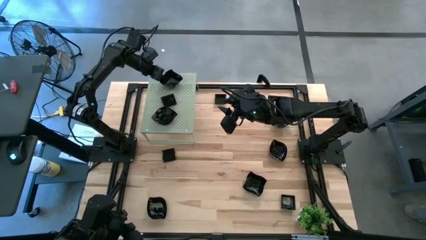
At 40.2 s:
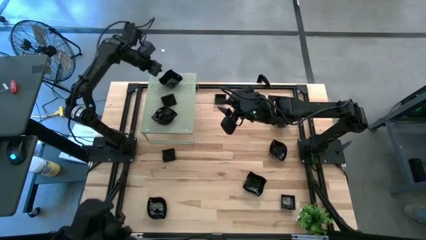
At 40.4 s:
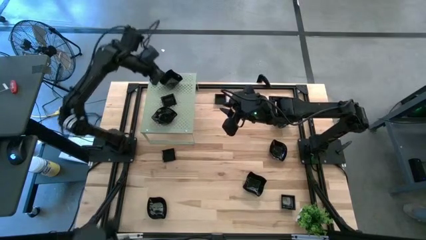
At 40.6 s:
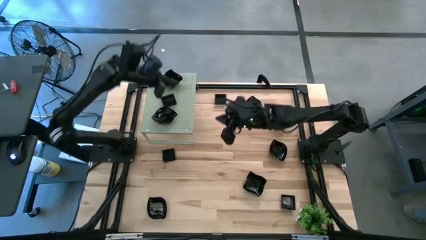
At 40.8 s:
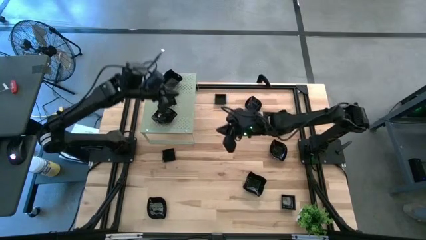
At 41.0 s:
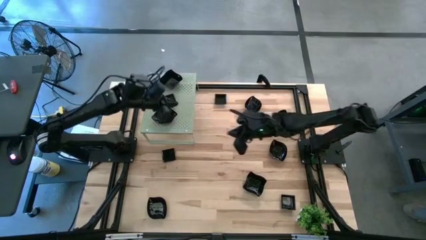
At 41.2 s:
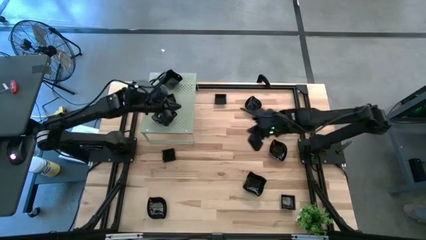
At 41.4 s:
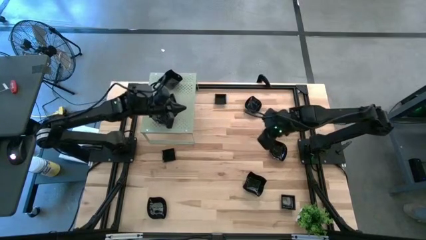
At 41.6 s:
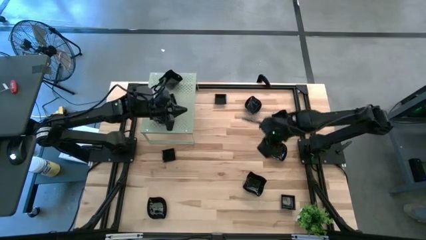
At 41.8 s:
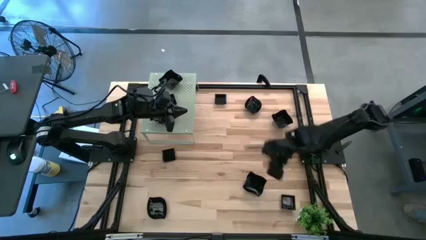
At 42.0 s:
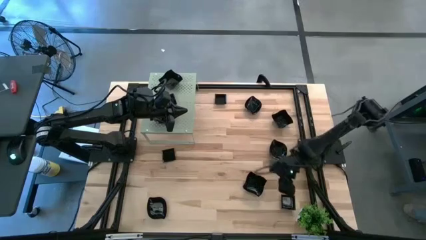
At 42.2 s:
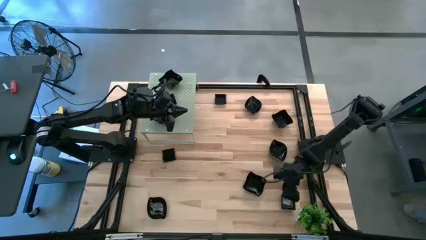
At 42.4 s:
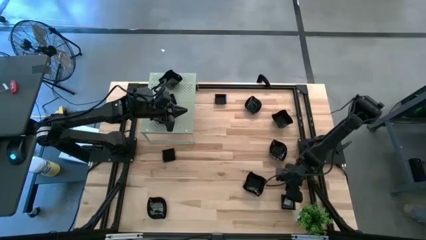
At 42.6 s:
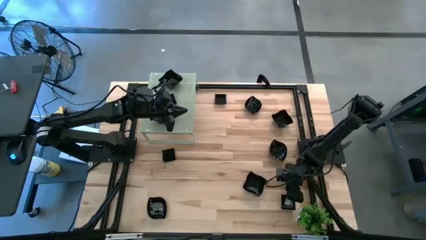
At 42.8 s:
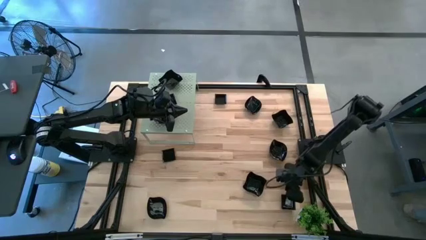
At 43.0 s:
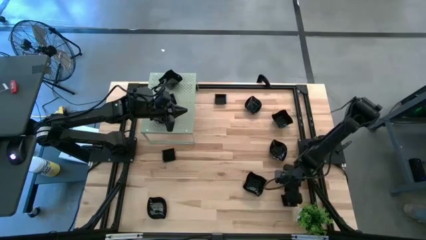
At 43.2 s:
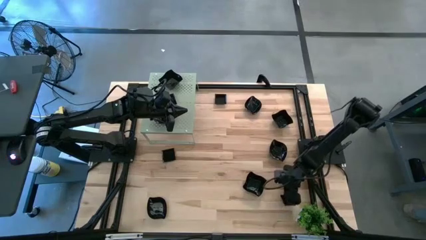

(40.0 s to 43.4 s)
Task: Pick & Place Mini shaped plates
Stack the square plate on the other square plate on the shelf

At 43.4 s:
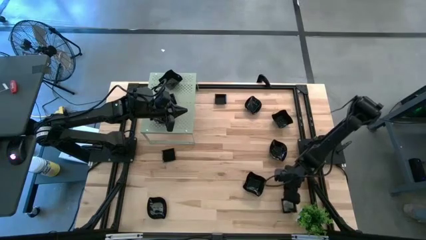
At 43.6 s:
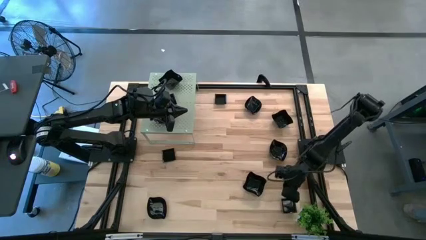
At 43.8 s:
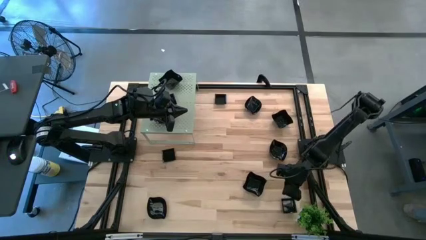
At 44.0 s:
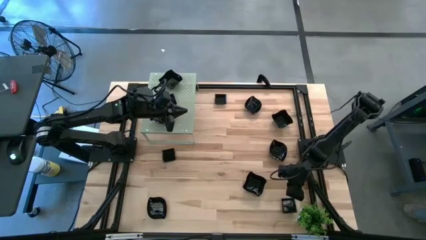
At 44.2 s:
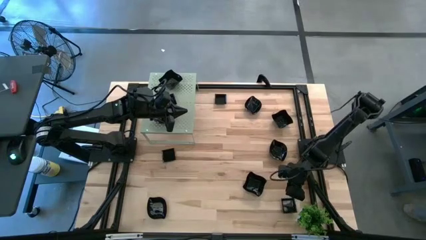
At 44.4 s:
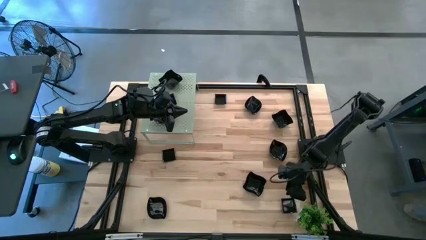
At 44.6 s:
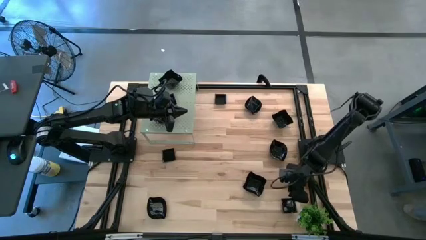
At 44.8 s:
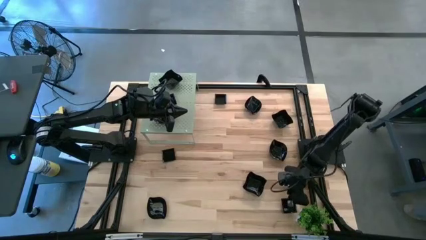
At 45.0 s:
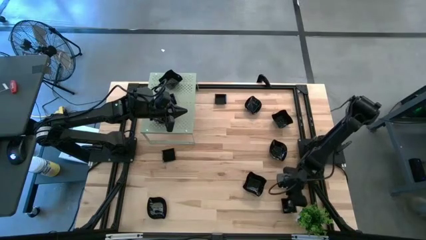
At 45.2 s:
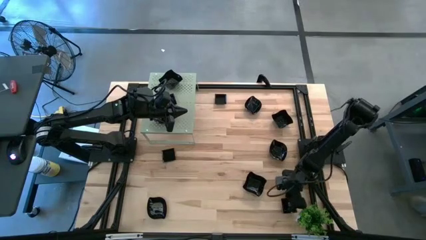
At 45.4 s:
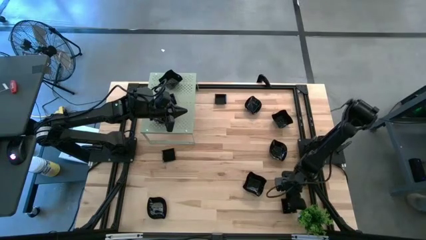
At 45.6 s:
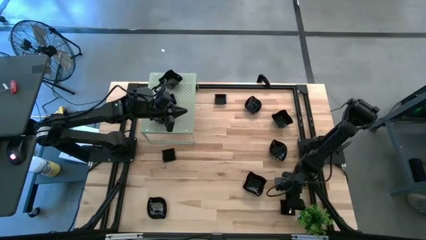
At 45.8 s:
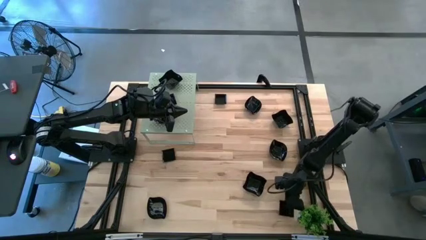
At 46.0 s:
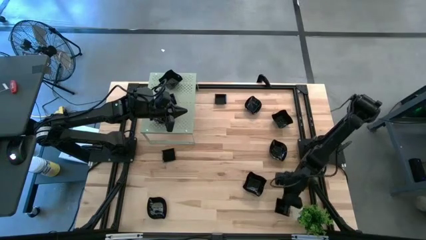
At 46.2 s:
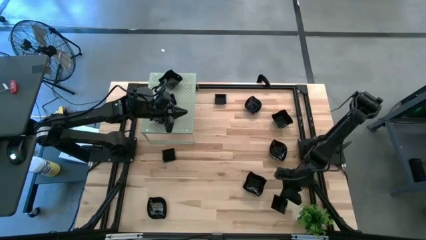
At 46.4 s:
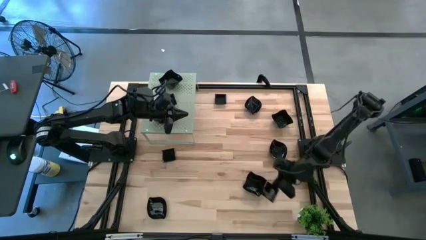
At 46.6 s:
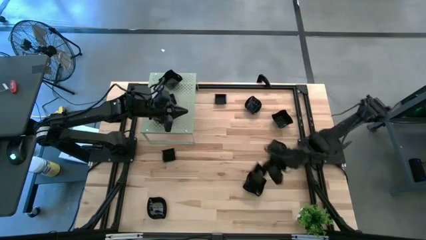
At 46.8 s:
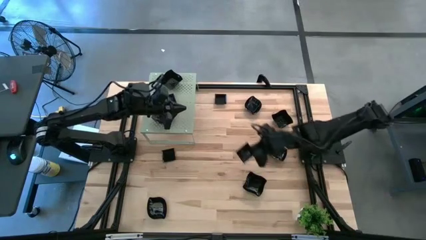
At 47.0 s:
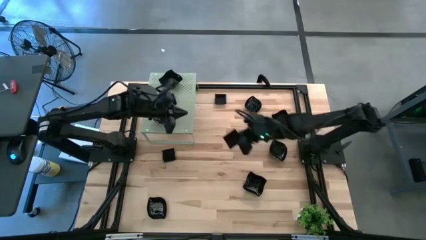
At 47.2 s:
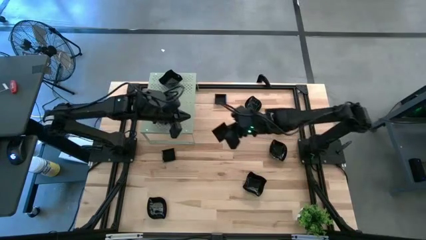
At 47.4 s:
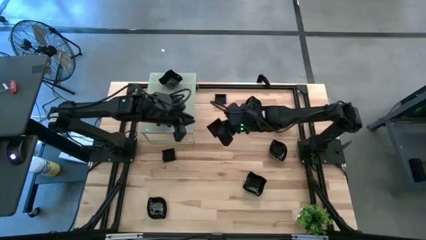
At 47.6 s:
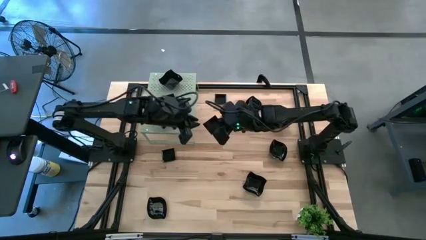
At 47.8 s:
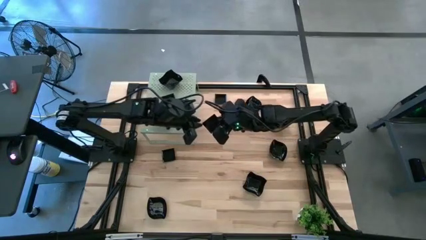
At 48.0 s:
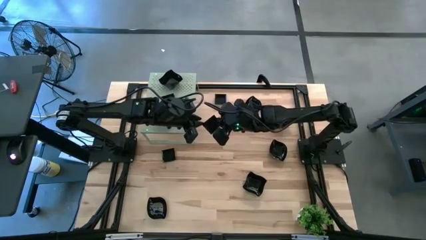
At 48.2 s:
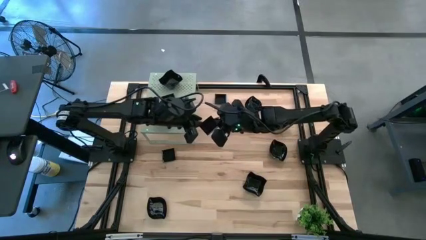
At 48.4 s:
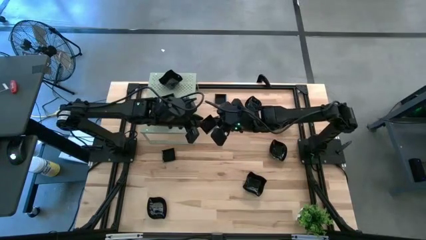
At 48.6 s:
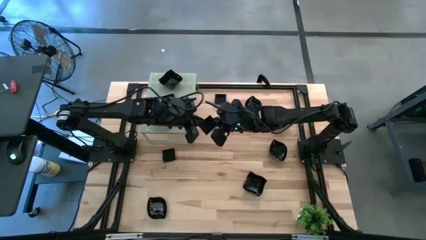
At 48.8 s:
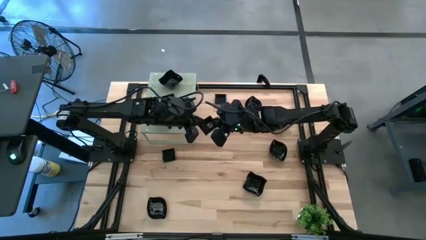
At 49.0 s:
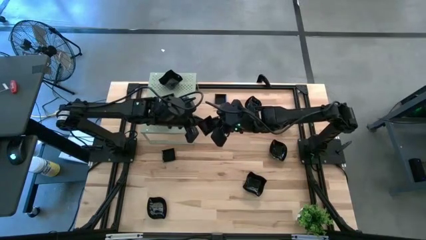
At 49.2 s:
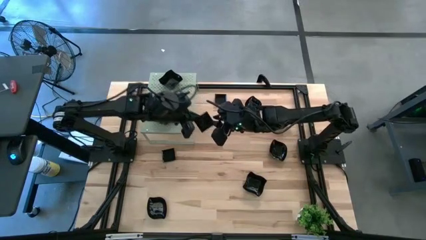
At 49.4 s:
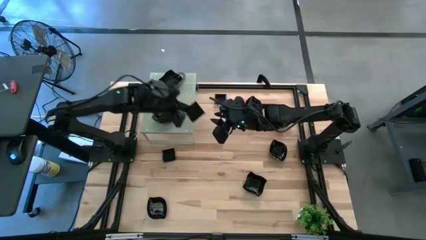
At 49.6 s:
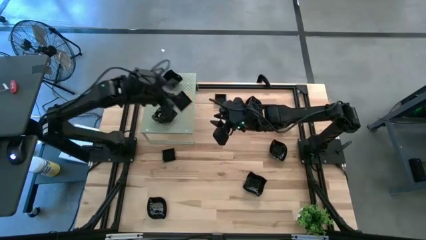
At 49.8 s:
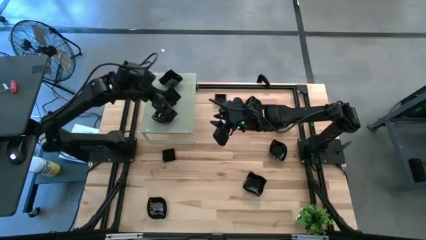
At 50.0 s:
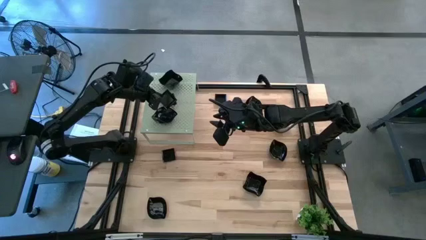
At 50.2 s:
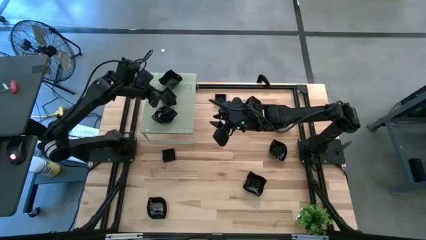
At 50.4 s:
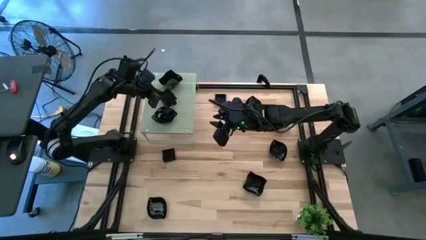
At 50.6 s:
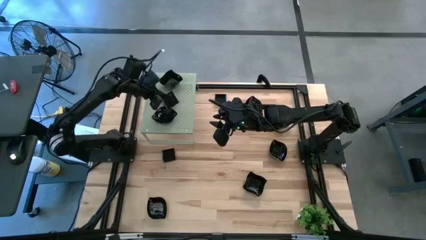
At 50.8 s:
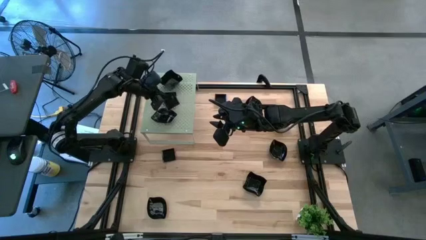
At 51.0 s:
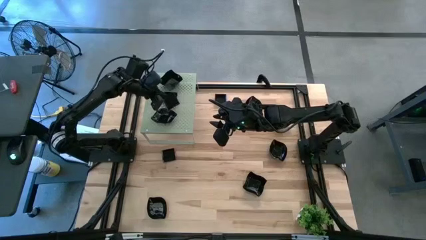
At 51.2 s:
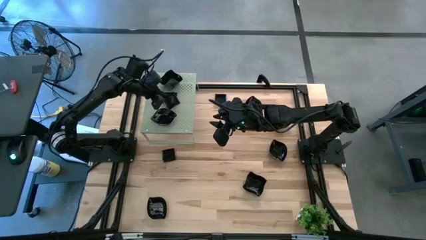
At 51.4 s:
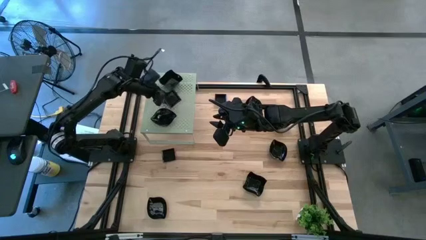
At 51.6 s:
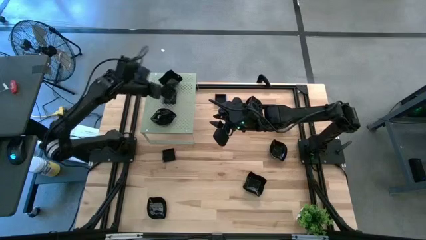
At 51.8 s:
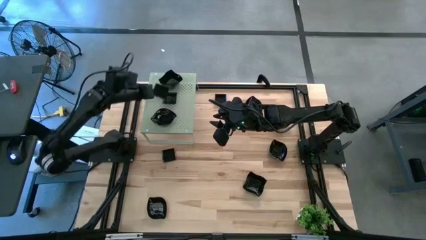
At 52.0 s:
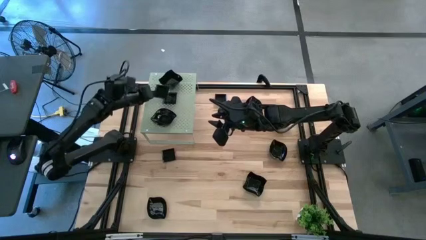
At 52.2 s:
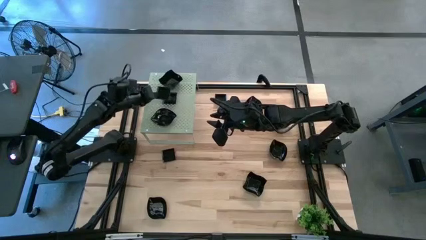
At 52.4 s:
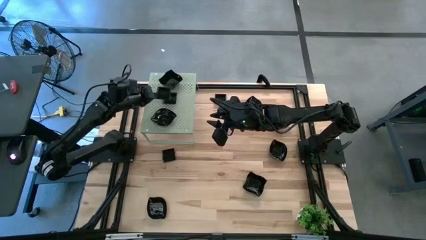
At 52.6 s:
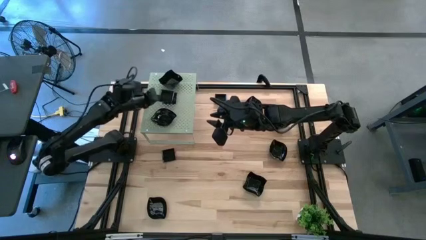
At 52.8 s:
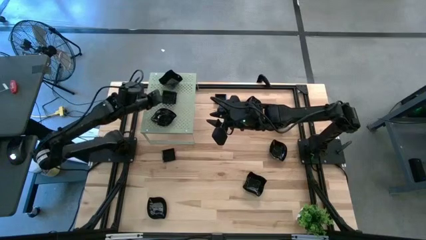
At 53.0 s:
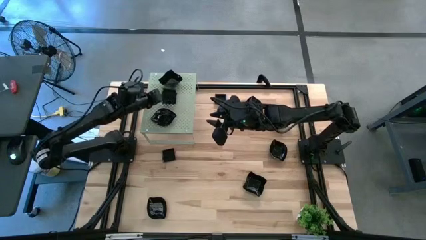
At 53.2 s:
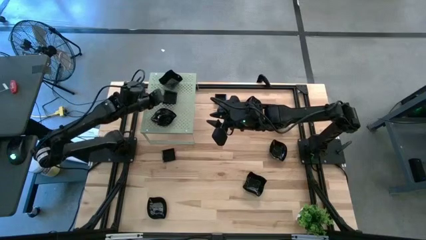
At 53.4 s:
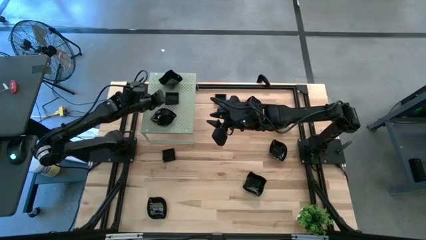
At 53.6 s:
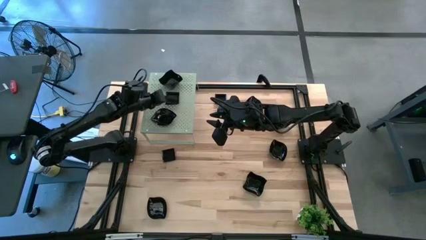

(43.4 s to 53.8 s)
Stack the square plate on the other square plate on the shelf
